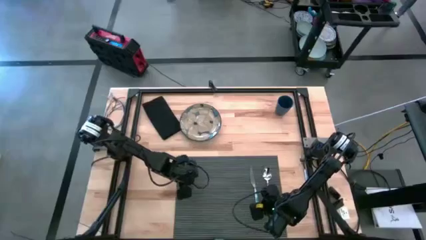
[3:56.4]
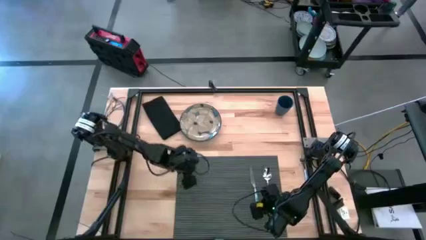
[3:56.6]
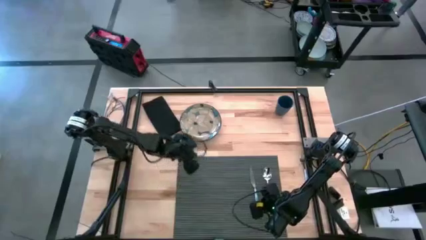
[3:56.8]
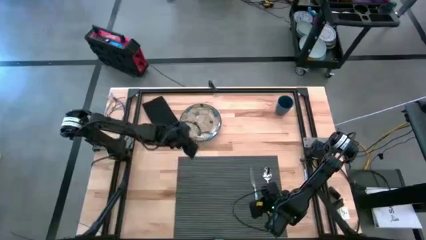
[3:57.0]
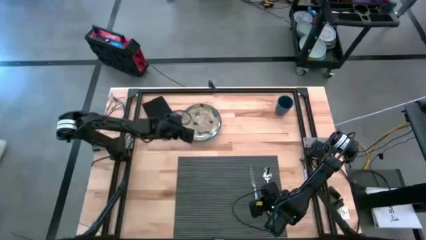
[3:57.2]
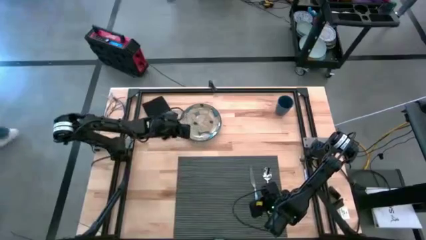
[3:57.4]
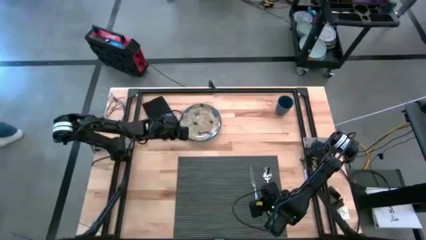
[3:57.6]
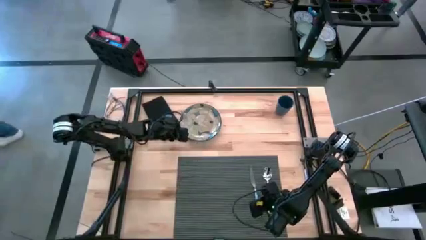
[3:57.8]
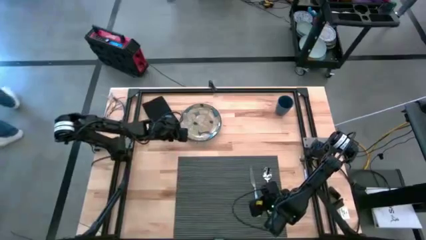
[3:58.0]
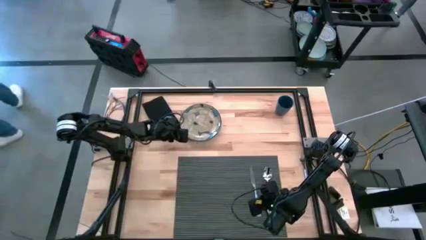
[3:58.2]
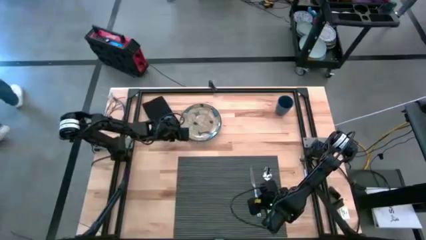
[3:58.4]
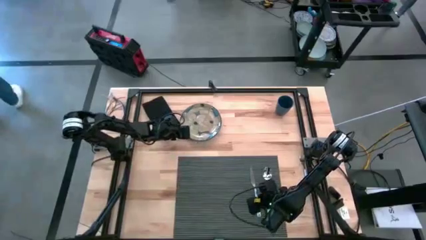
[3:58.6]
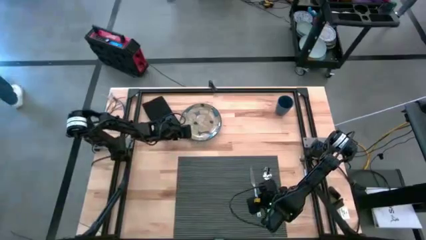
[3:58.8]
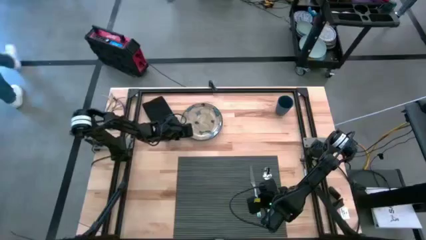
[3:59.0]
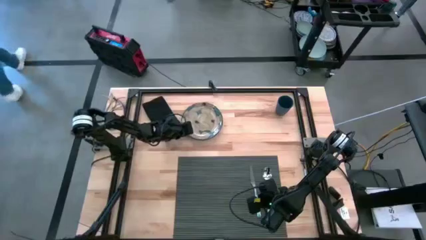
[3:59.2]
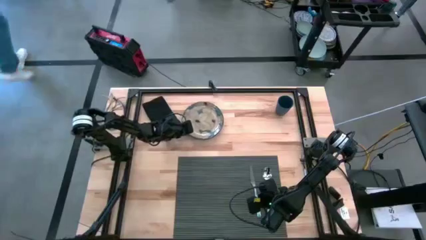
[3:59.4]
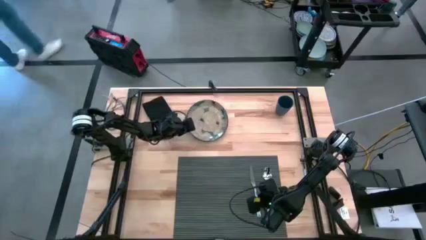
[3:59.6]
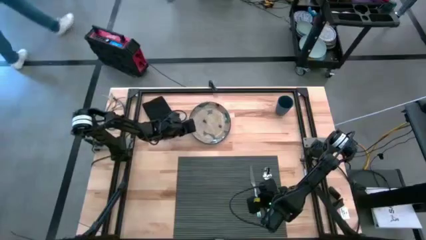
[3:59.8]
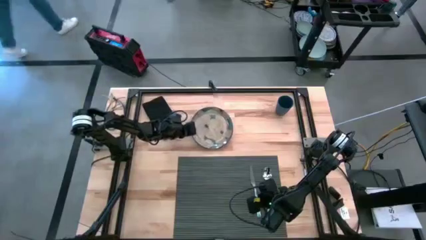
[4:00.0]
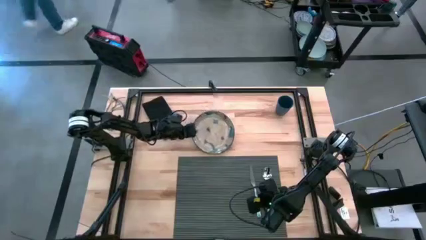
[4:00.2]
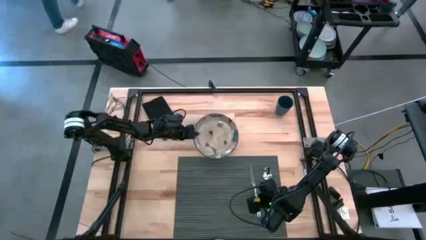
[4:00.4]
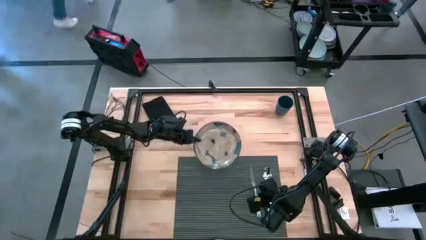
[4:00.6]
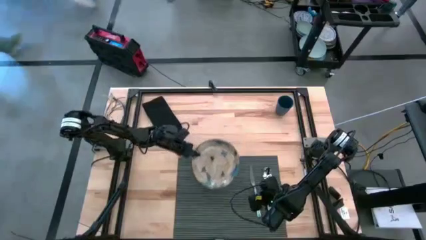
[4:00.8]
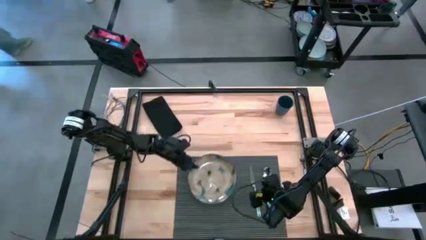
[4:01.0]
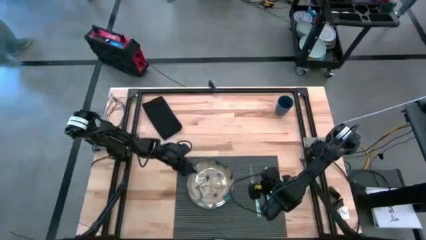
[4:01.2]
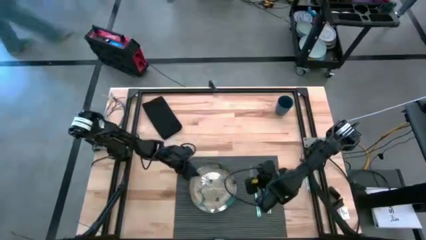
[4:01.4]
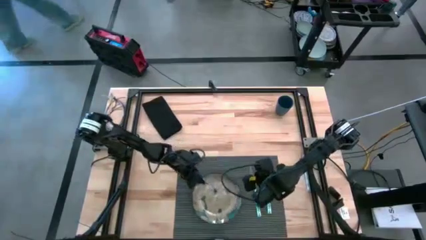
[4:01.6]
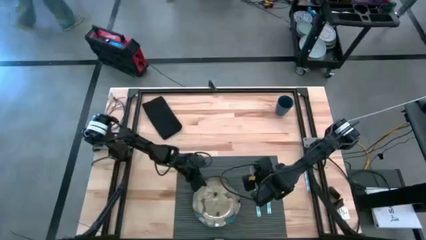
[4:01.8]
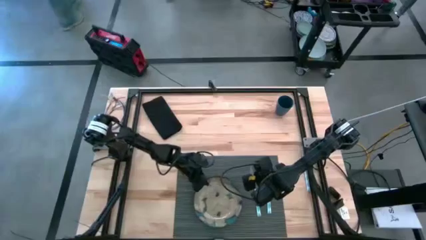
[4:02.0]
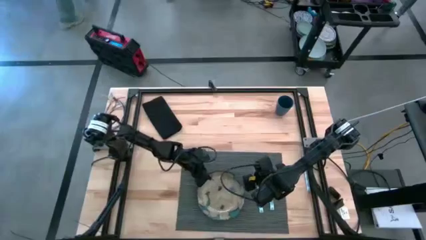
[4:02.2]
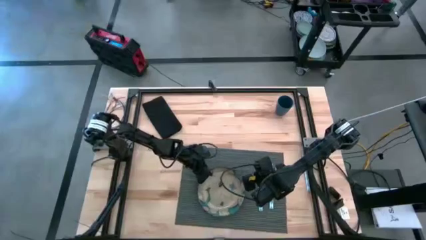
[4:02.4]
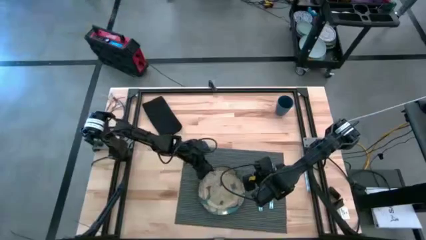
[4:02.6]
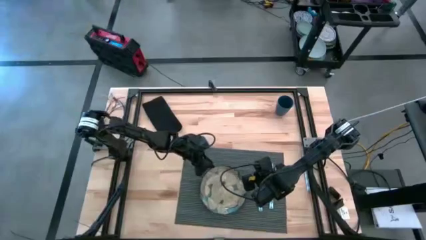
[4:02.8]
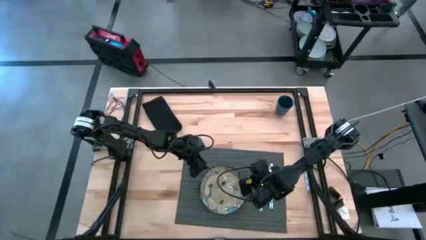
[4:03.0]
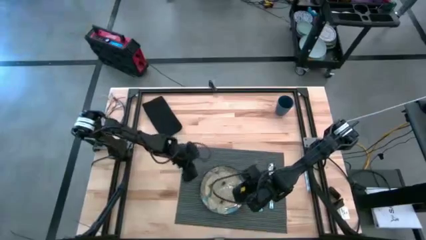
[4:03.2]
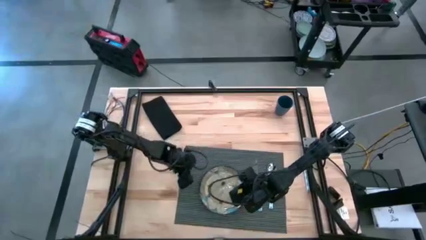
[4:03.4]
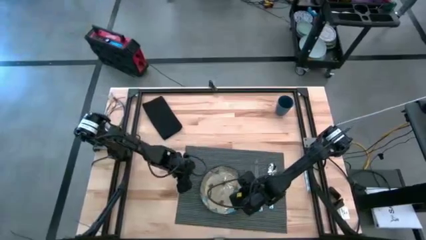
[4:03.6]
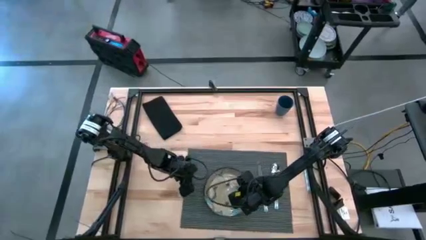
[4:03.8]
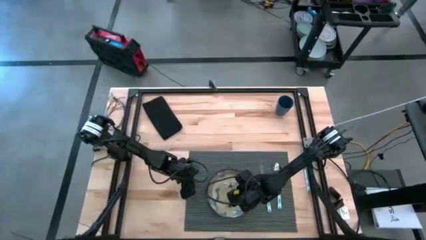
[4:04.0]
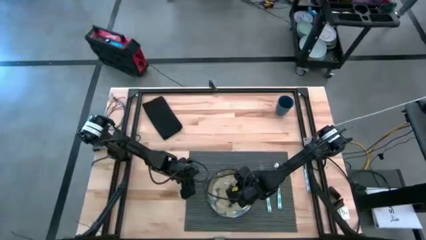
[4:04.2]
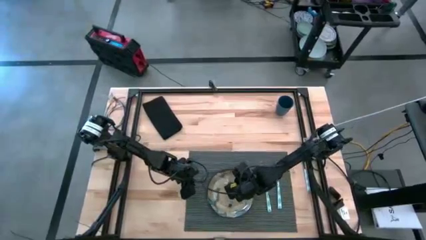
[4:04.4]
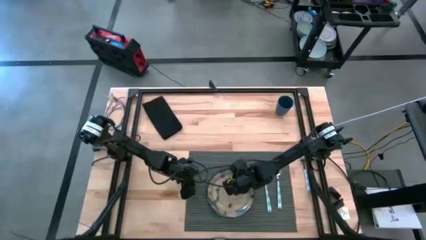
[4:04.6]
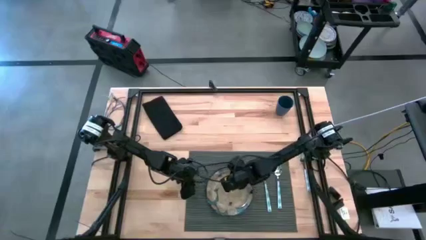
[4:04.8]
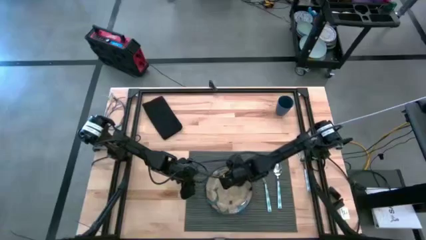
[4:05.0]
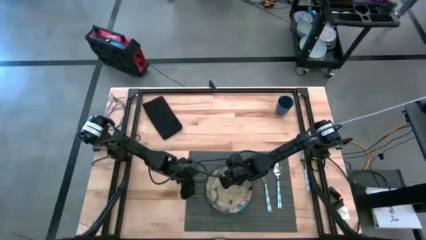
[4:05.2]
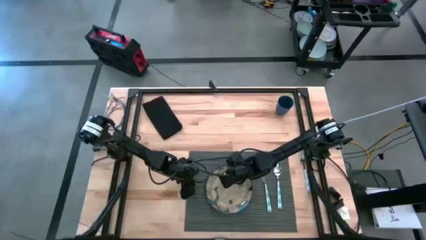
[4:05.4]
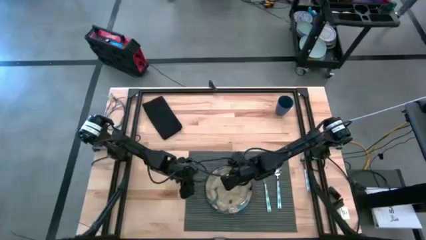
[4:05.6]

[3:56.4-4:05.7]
Task: Set table place
Put the white plate on the gray mat to the right of the blue knife

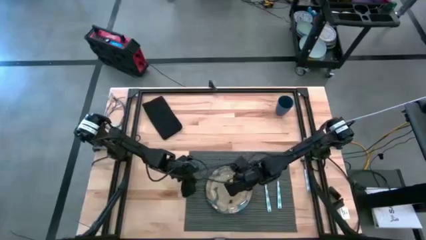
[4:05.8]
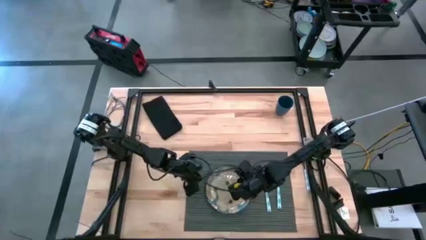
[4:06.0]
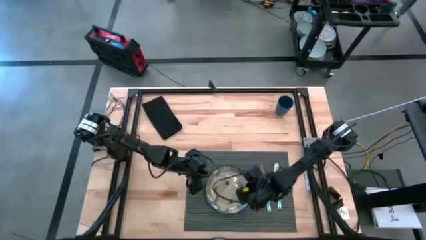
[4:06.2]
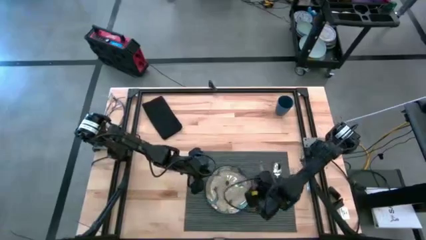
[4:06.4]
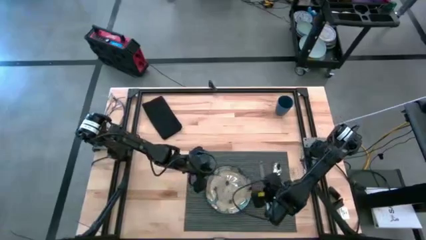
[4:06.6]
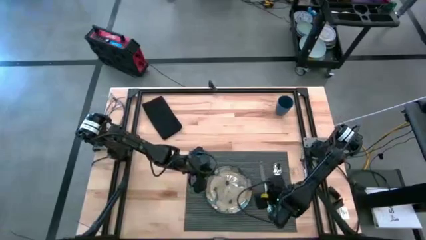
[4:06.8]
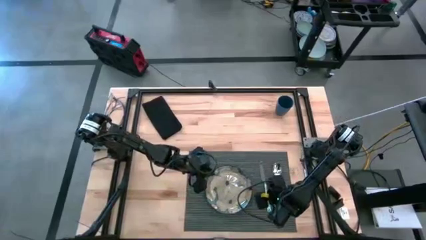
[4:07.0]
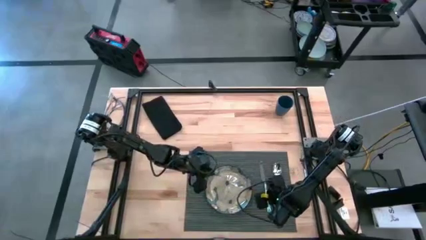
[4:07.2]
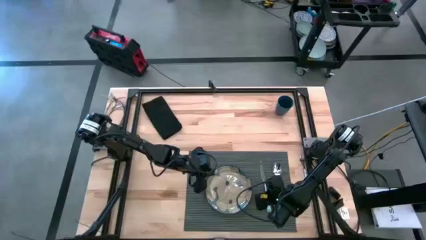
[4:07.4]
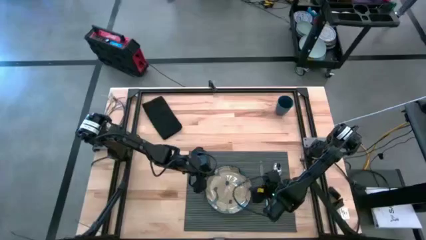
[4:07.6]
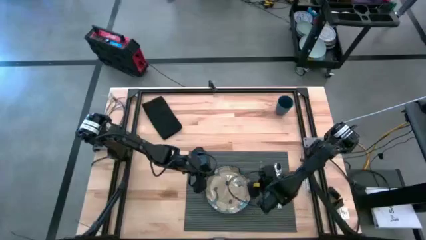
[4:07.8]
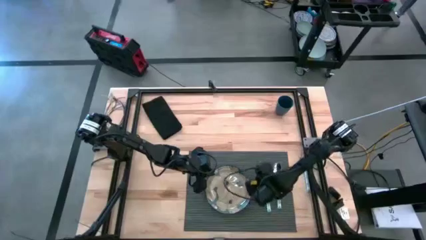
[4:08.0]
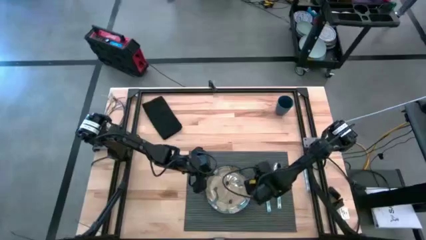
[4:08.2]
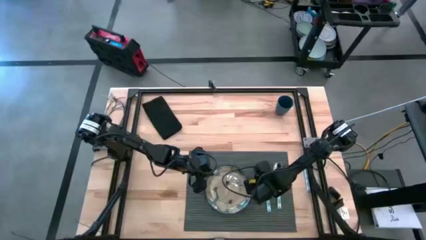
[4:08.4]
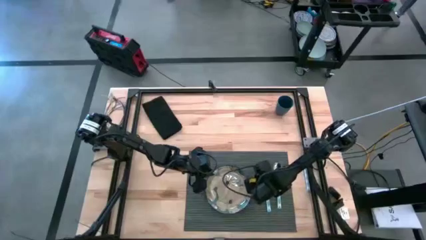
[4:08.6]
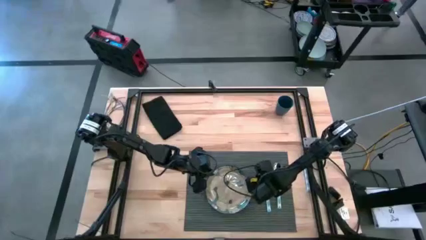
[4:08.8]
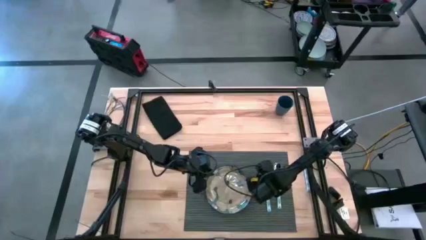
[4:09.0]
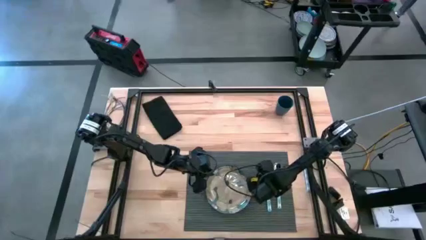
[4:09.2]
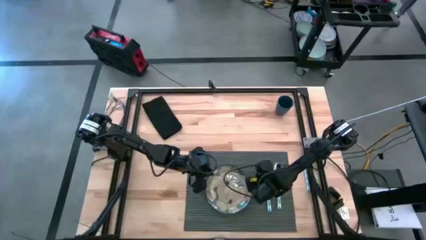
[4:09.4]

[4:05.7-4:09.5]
Adjust the blue knife on the gray mat

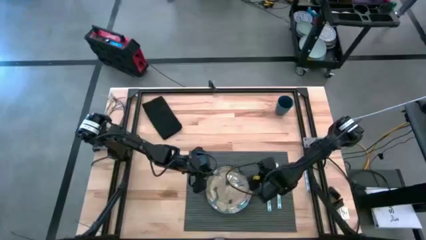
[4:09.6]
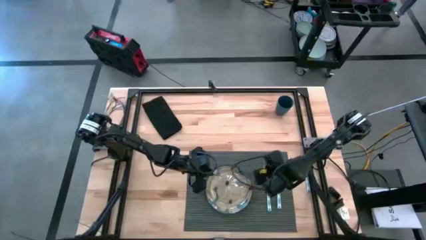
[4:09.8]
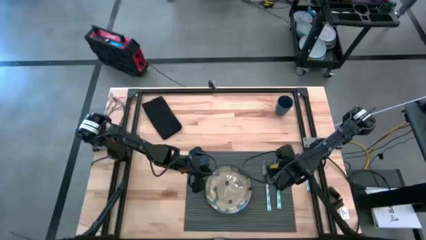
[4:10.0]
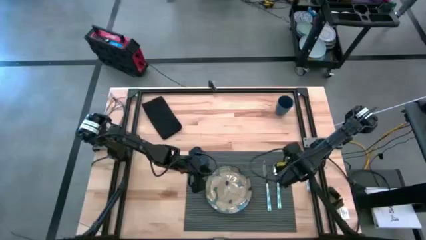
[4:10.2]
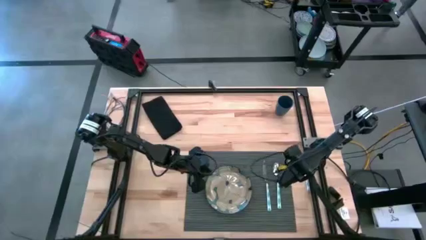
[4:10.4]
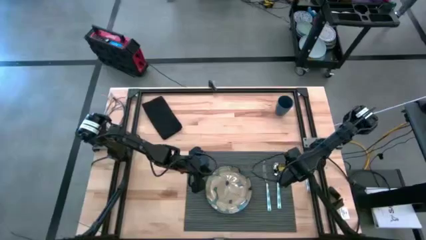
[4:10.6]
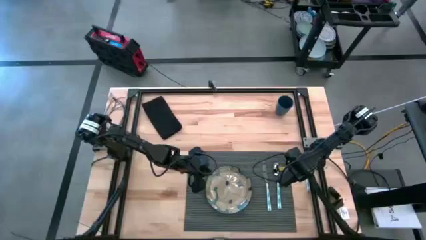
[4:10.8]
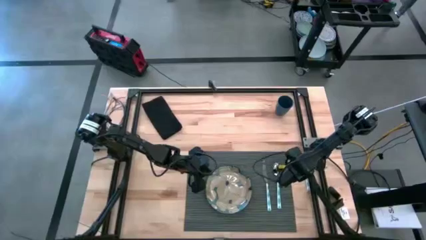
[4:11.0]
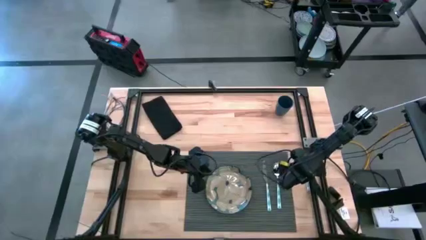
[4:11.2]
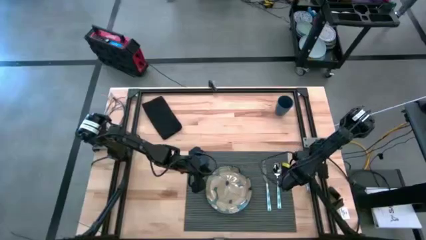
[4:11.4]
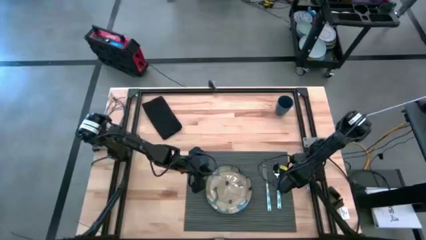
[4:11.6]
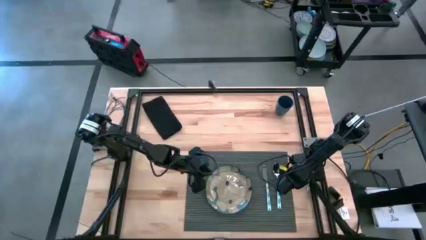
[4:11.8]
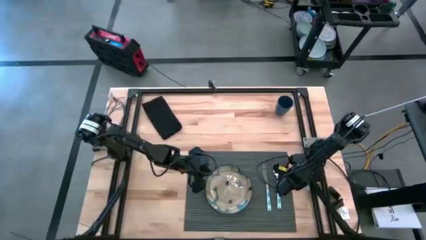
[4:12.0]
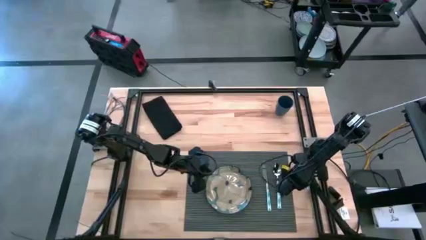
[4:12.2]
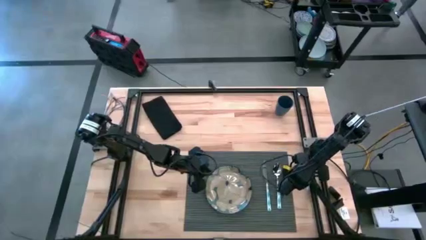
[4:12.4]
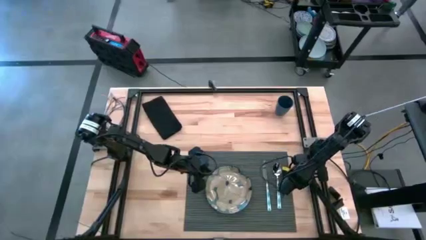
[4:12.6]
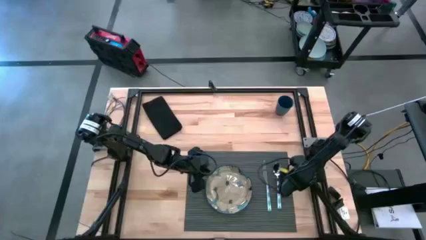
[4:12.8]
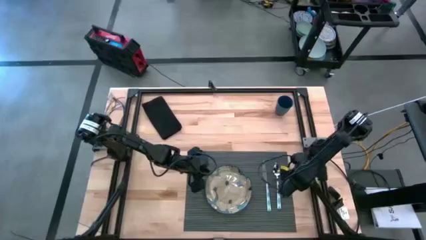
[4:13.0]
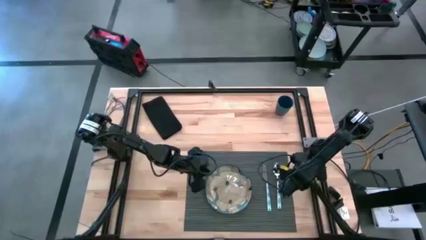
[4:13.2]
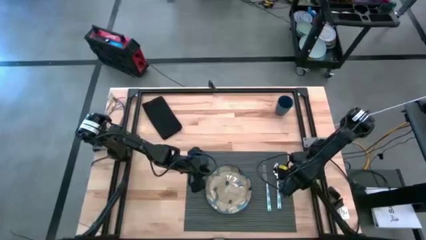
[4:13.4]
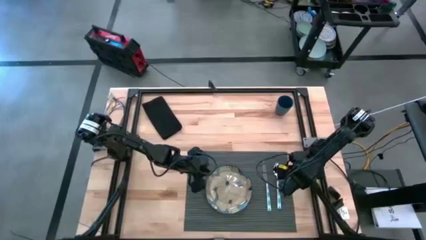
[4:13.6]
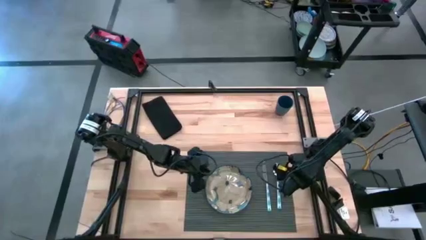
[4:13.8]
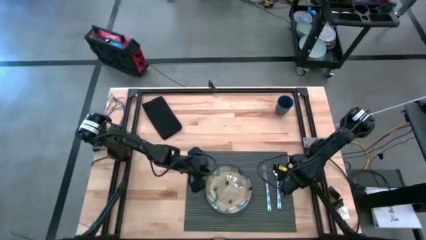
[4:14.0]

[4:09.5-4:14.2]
Move the blue fork to the top left of the table
